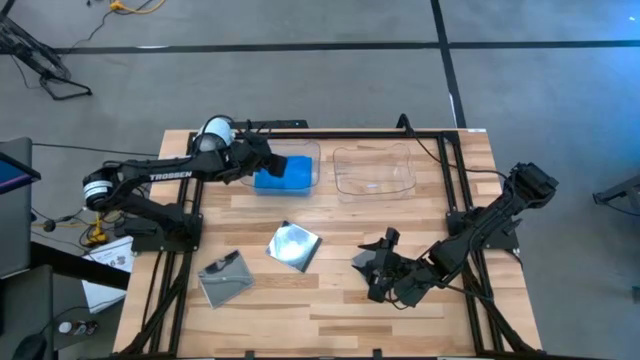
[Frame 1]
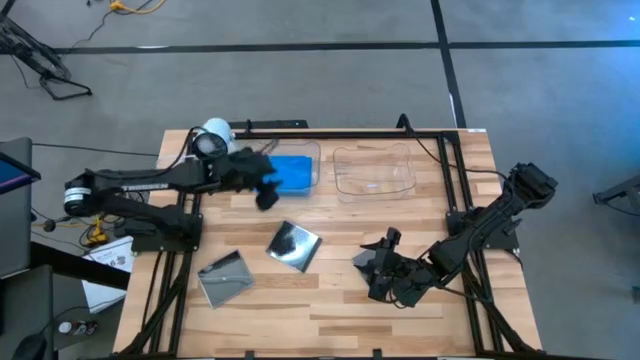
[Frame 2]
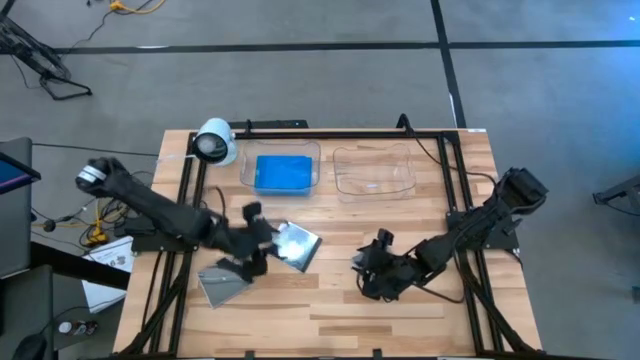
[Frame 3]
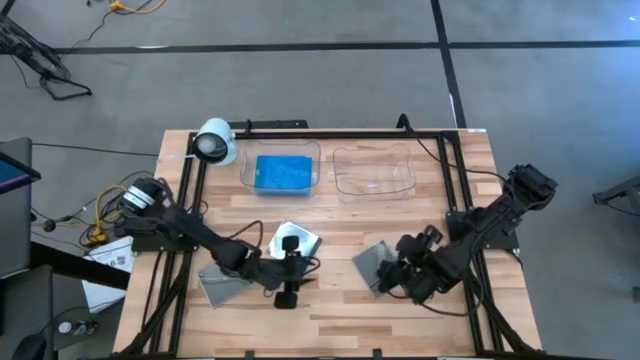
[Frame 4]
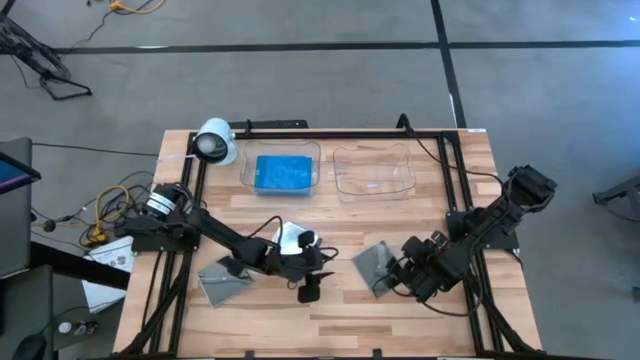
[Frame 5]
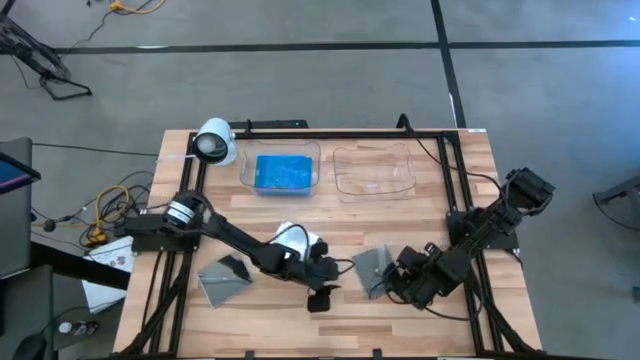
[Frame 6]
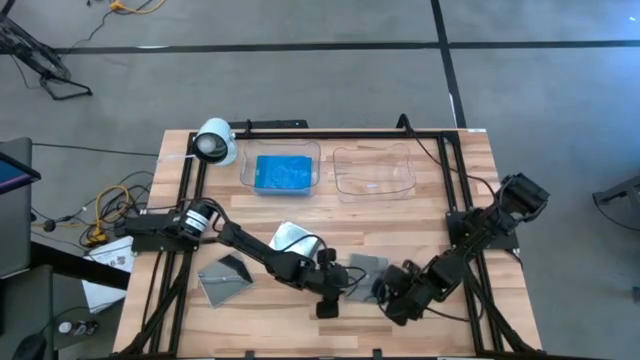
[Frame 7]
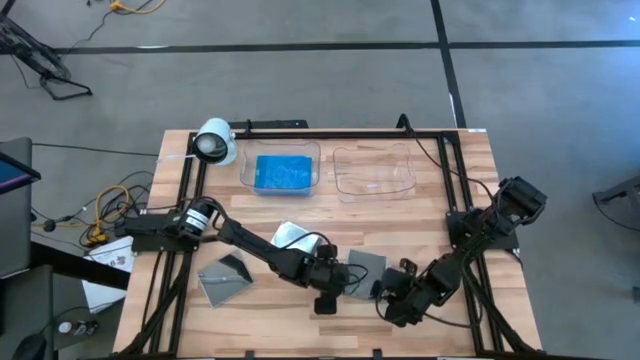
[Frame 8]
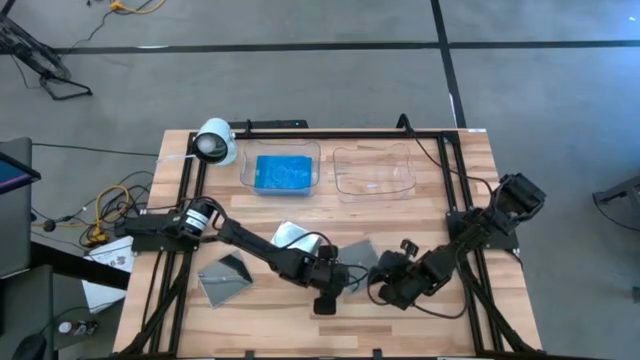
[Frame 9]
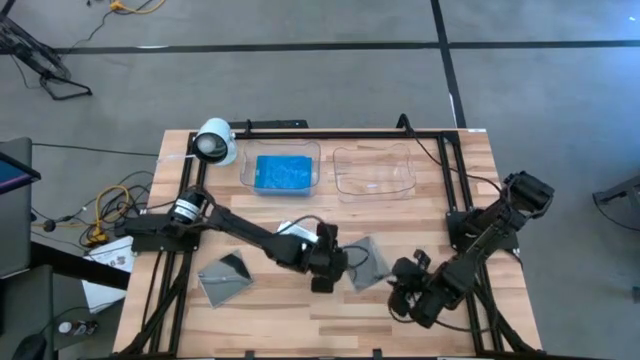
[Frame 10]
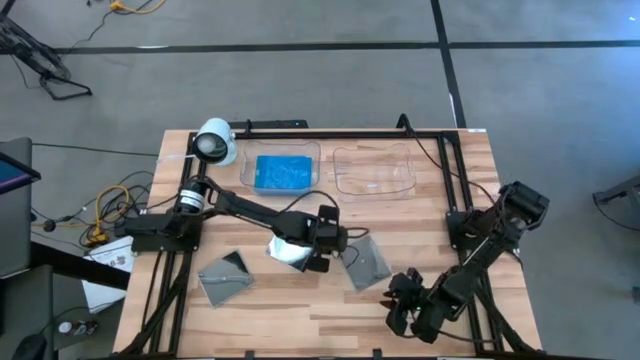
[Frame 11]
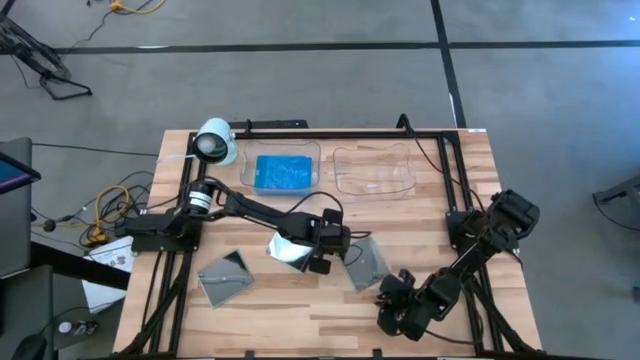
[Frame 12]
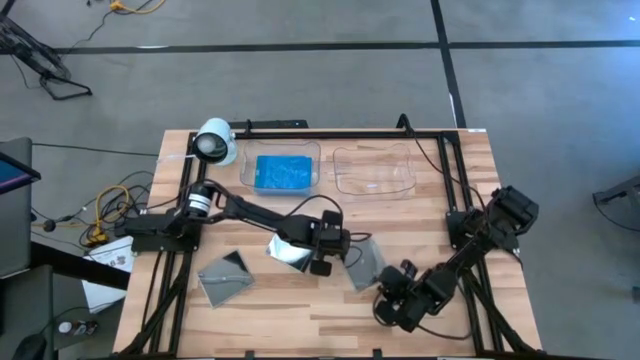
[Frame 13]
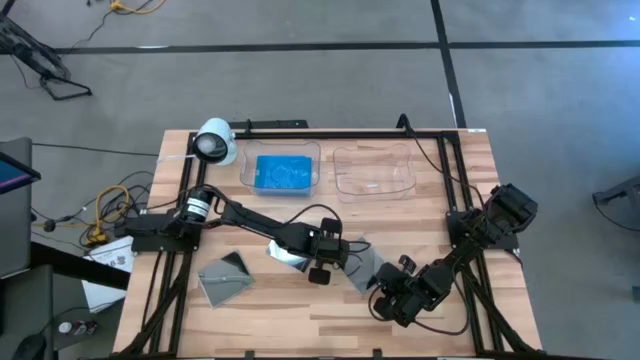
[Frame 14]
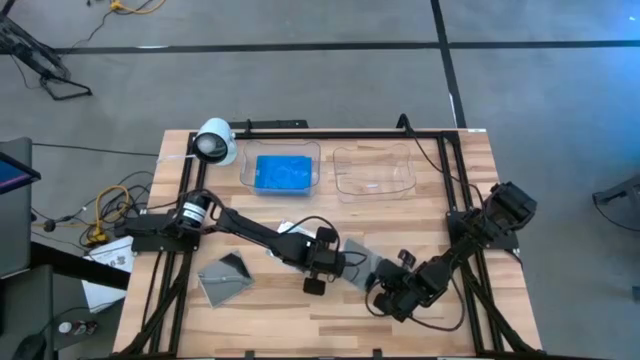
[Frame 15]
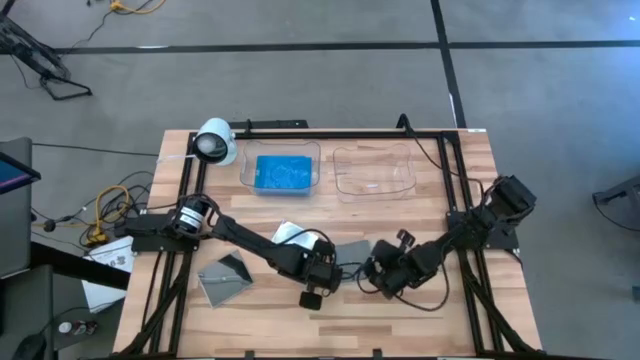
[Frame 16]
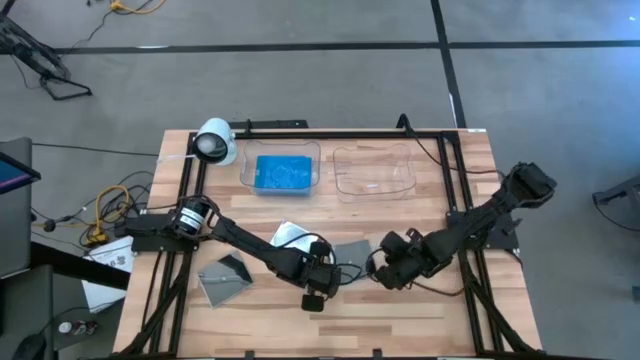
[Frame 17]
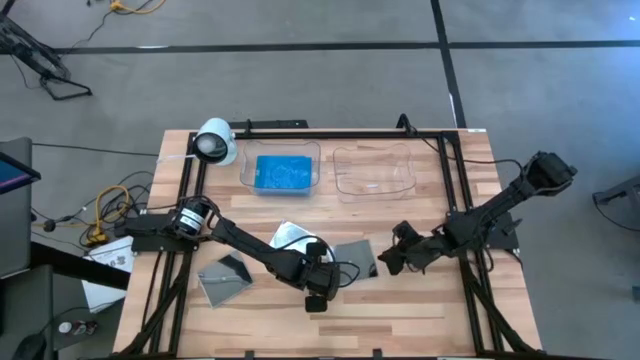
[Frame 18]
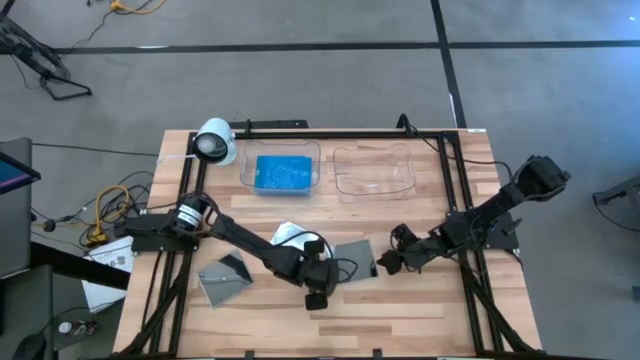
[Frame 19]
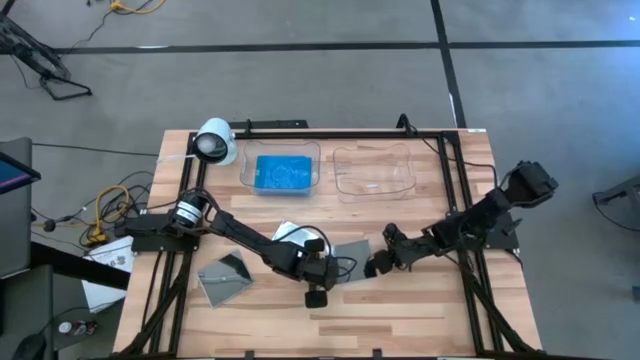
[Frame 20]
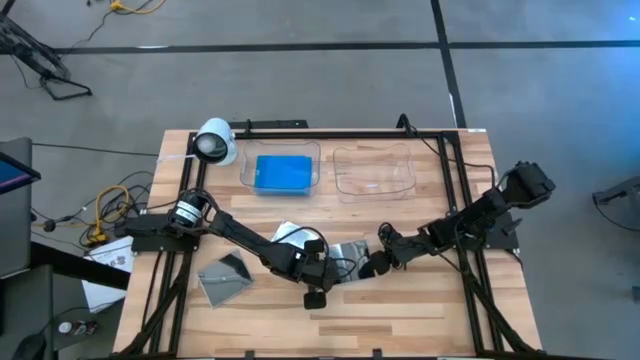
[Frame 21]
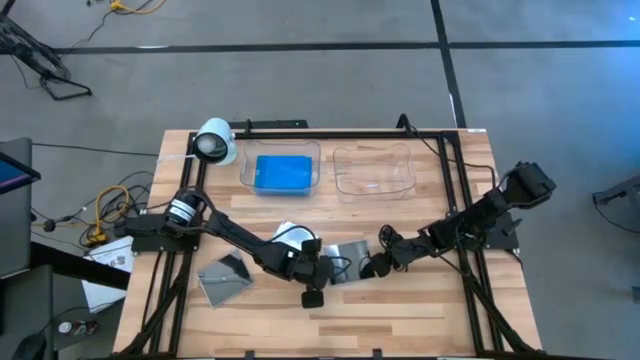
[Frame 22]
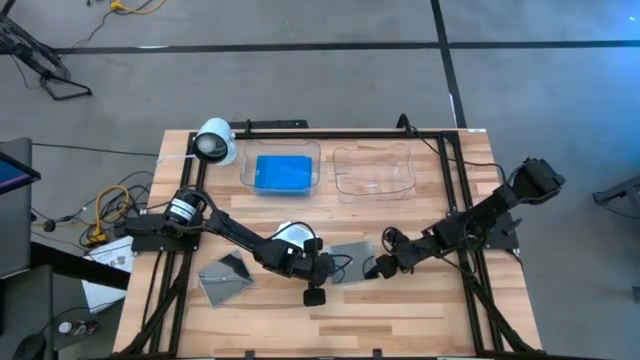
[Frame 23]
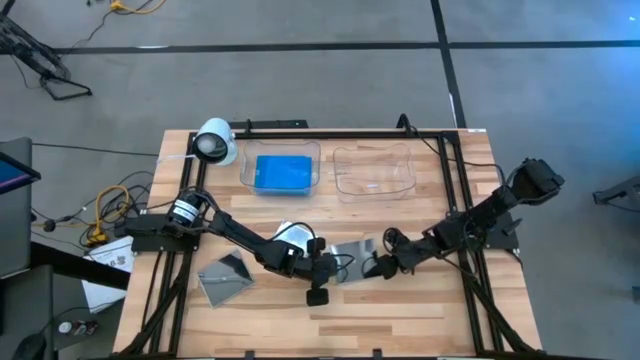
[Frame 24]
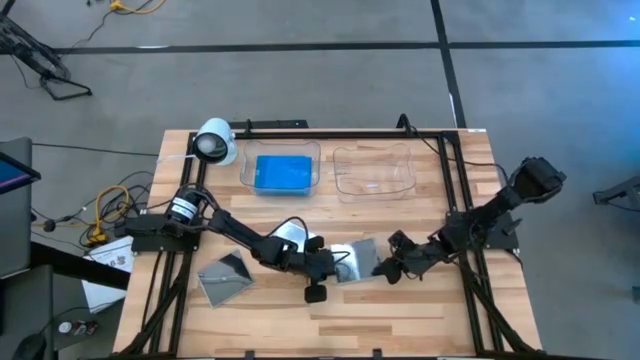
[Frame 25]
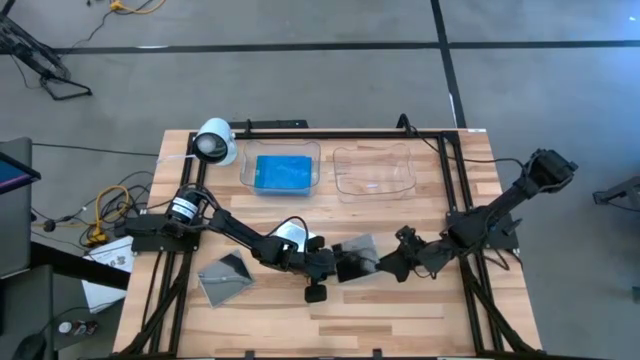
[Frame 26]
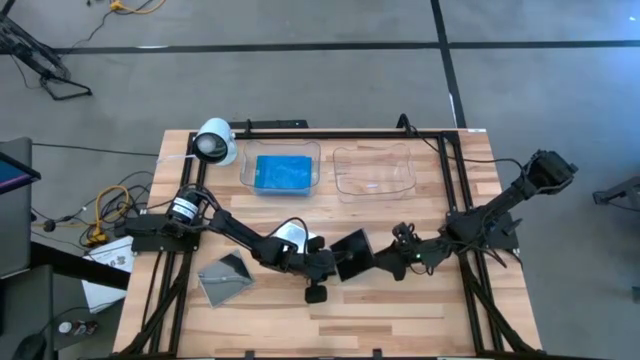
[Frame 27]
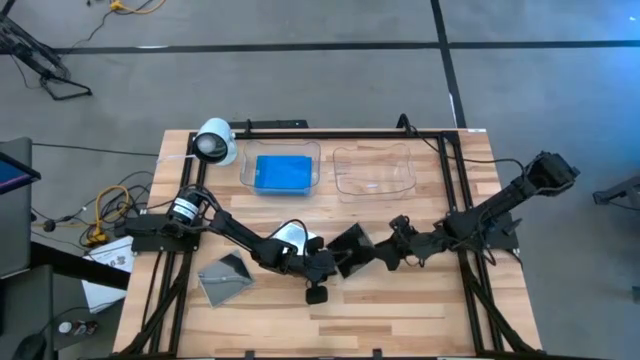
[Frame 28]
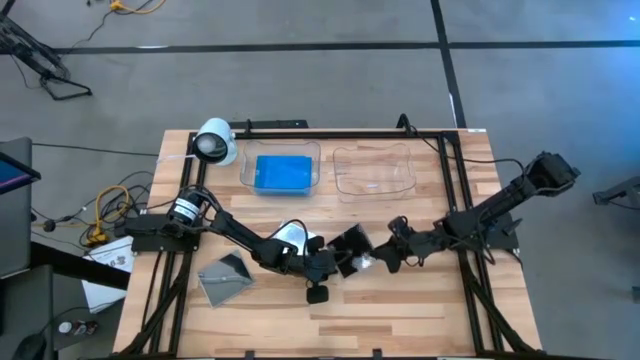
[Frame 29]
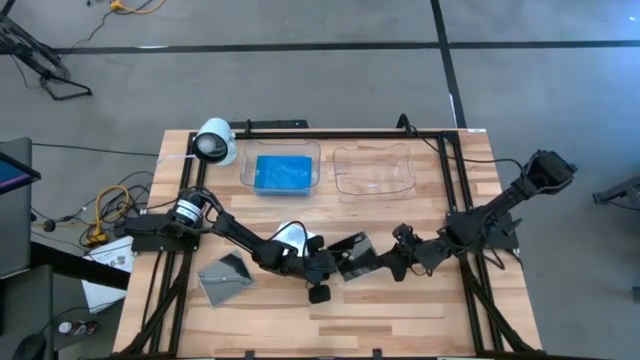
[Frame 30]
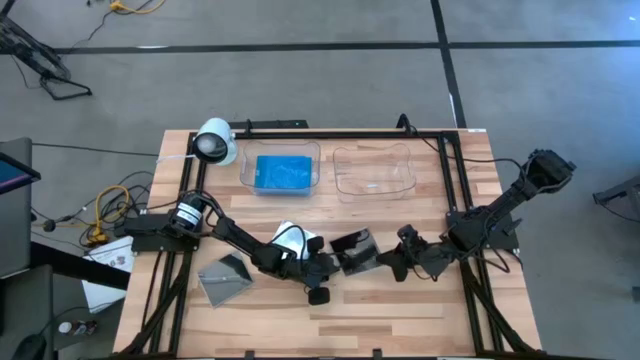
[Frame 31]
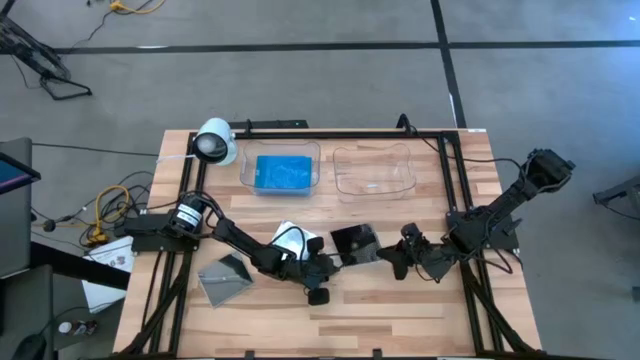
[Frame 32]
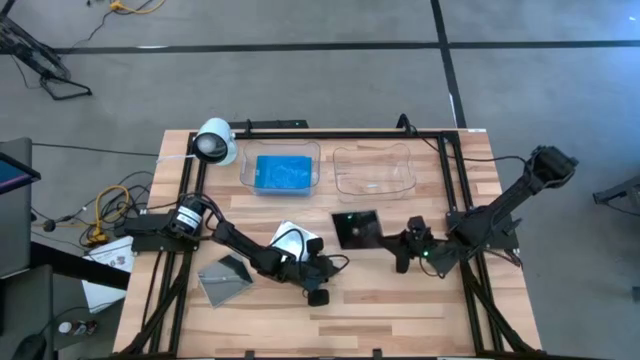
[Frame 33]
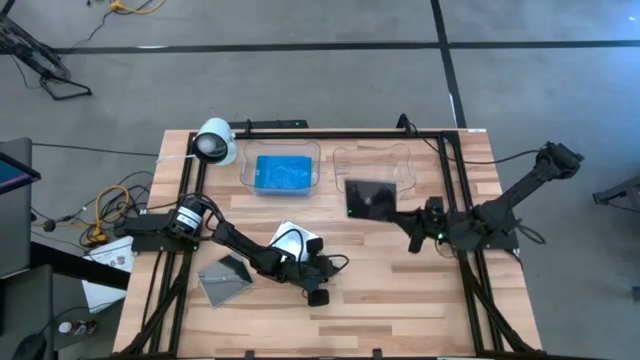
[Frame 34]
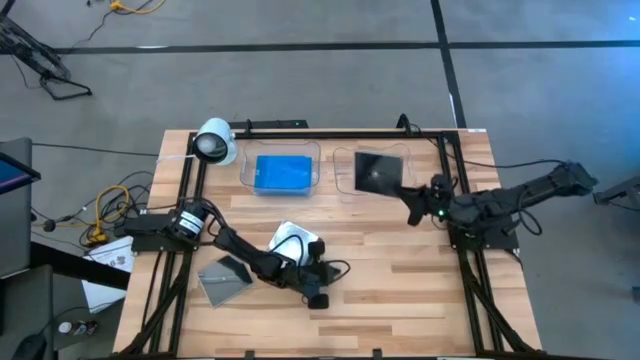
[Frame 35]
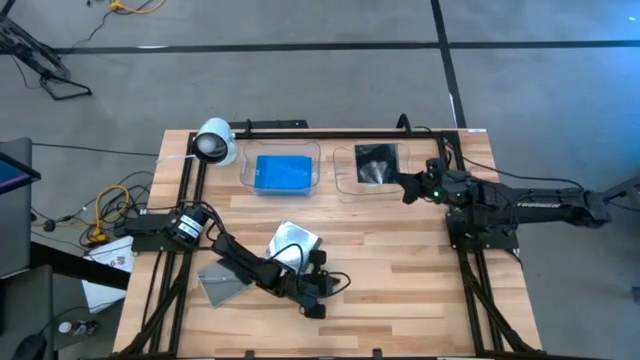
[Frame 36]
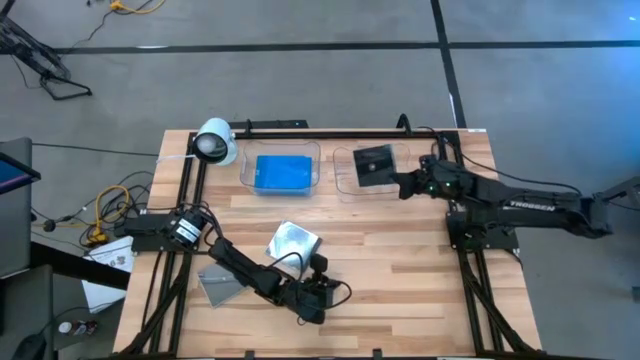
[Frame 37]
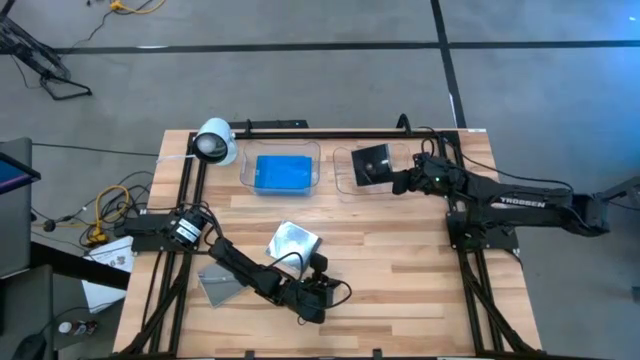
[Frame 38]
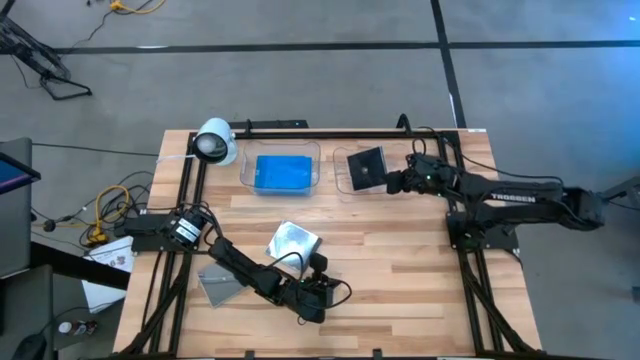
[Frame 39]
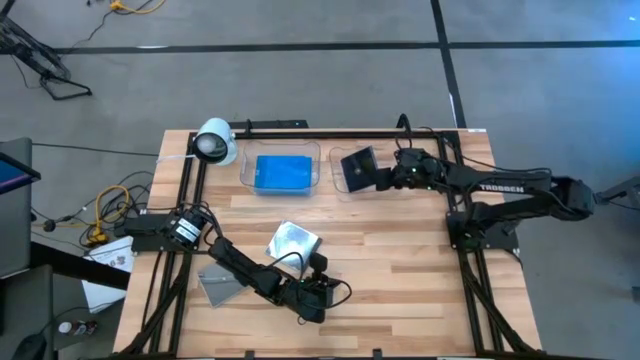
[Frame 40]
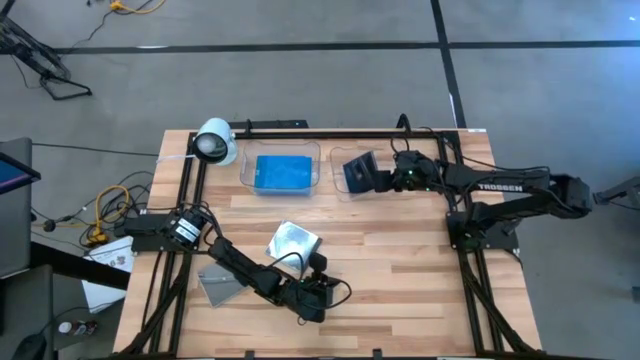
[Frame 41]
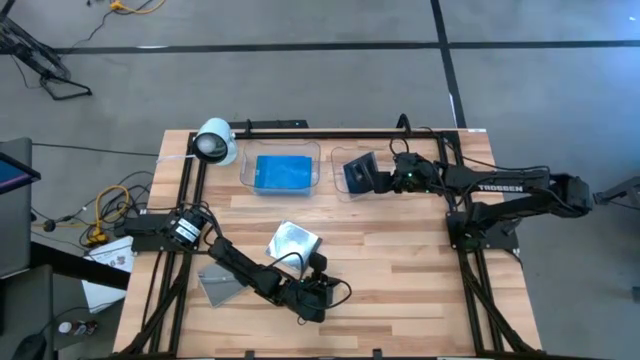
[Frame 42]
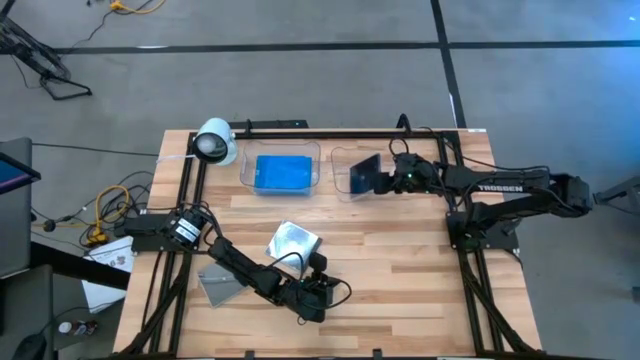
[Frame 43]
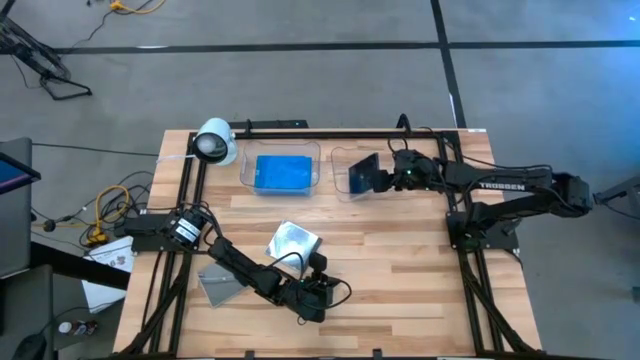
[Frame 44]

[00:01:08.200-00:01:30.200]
Task: Pick & place jewel cases by type
Put the right black cd case into the right transparent bin
